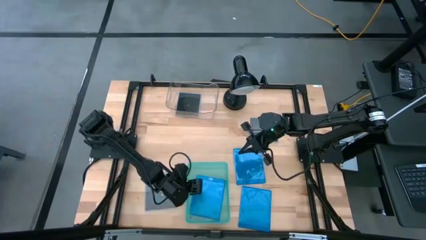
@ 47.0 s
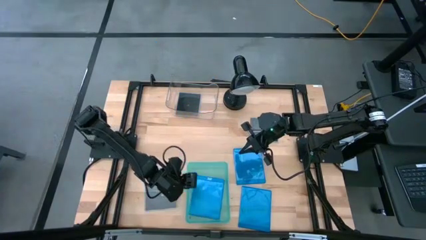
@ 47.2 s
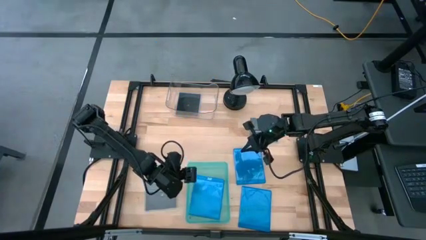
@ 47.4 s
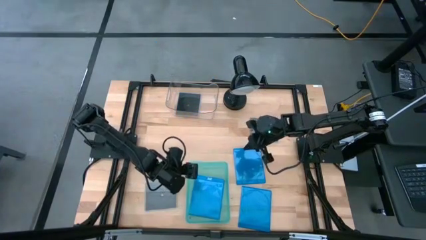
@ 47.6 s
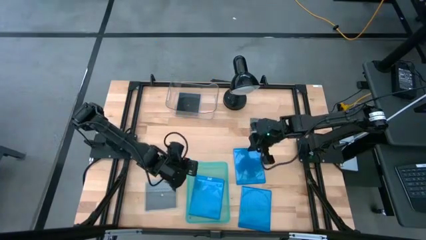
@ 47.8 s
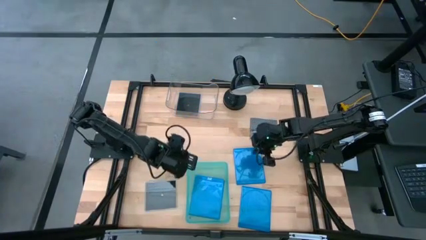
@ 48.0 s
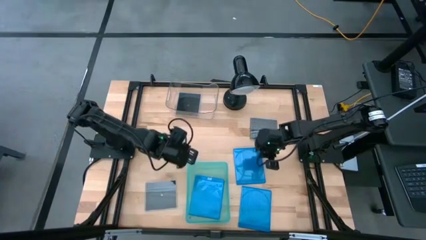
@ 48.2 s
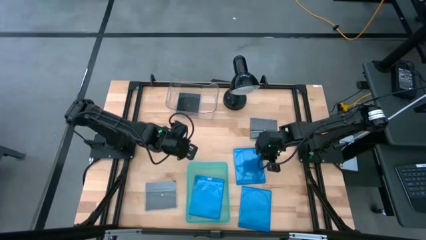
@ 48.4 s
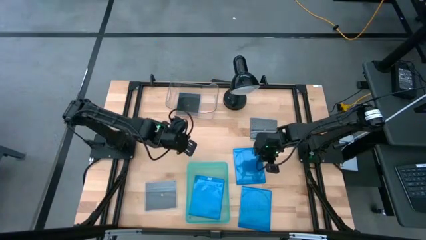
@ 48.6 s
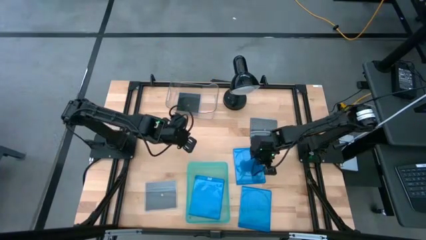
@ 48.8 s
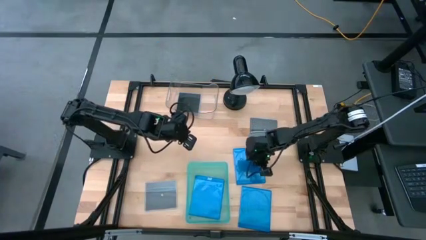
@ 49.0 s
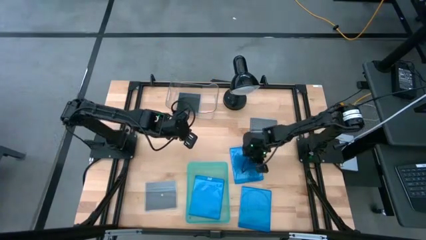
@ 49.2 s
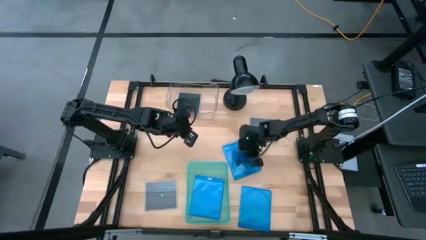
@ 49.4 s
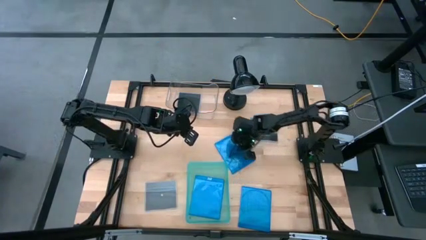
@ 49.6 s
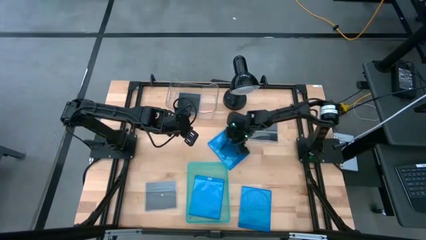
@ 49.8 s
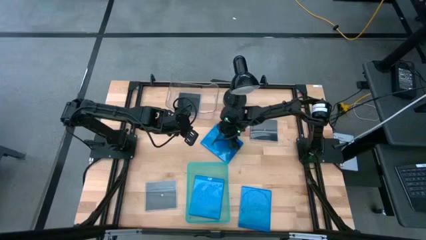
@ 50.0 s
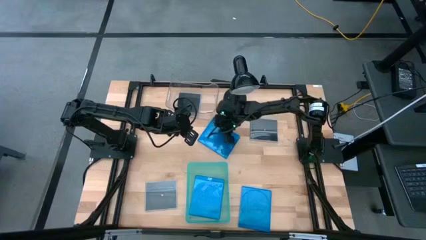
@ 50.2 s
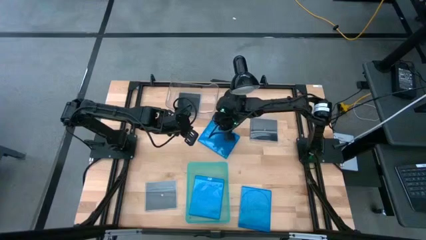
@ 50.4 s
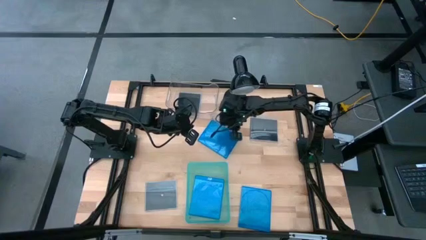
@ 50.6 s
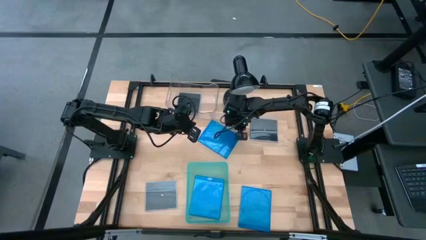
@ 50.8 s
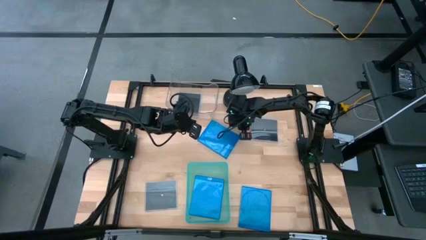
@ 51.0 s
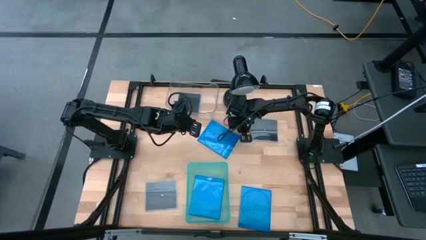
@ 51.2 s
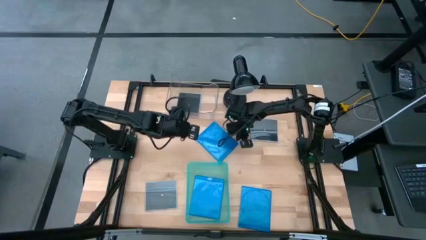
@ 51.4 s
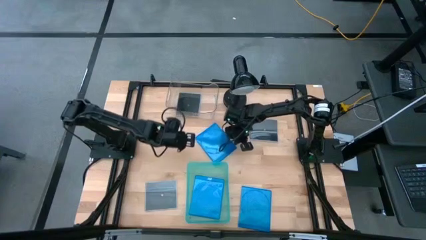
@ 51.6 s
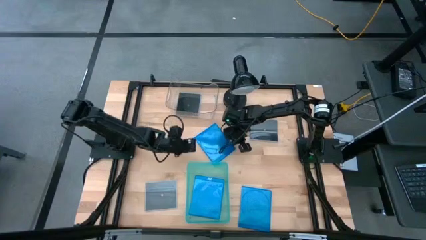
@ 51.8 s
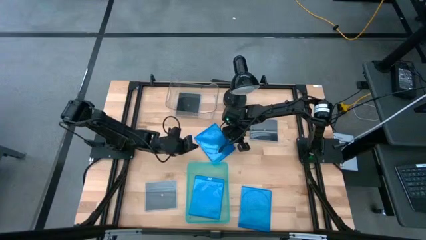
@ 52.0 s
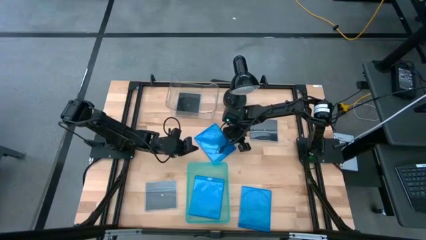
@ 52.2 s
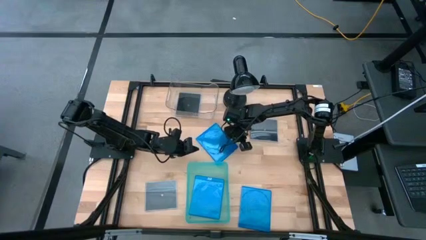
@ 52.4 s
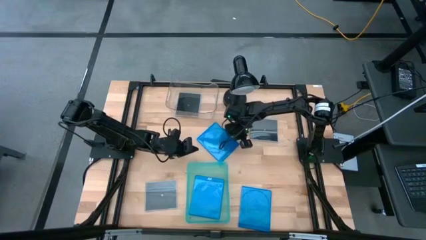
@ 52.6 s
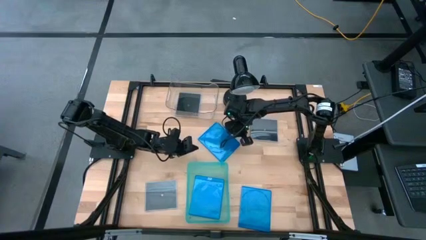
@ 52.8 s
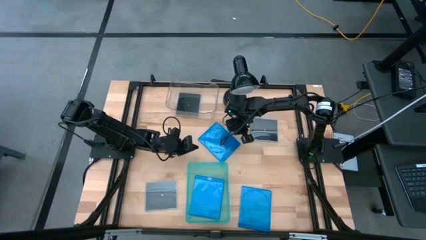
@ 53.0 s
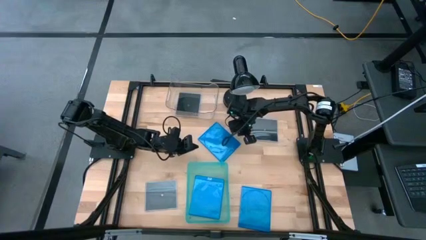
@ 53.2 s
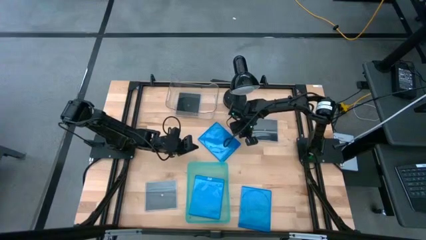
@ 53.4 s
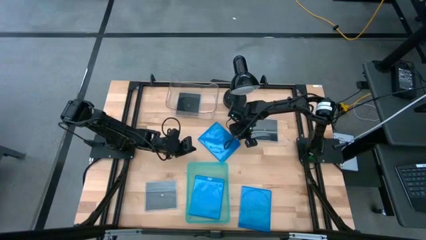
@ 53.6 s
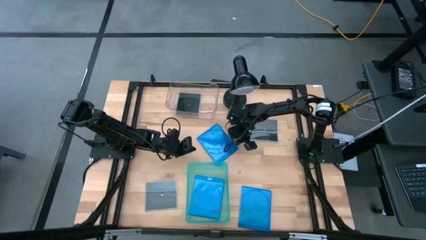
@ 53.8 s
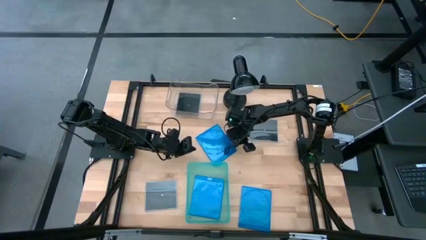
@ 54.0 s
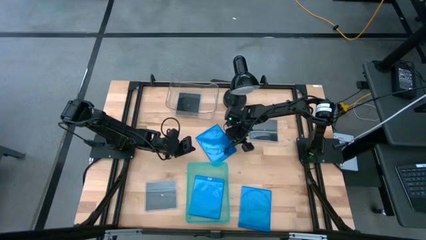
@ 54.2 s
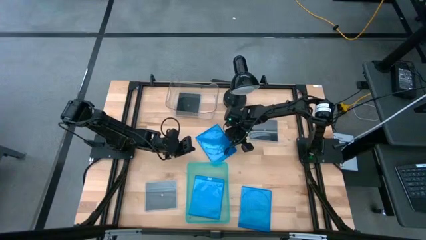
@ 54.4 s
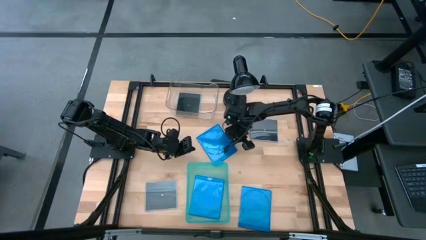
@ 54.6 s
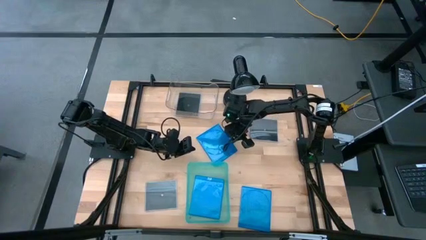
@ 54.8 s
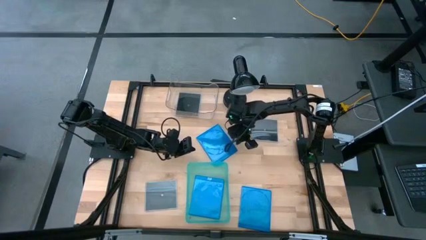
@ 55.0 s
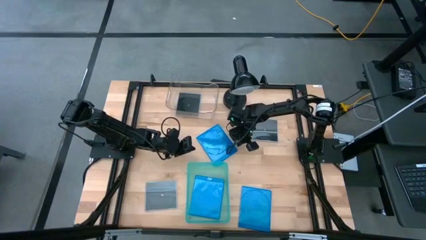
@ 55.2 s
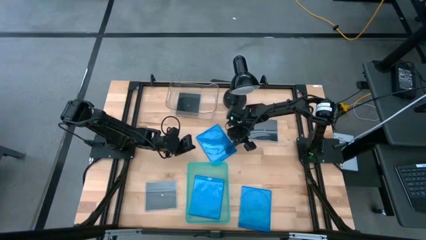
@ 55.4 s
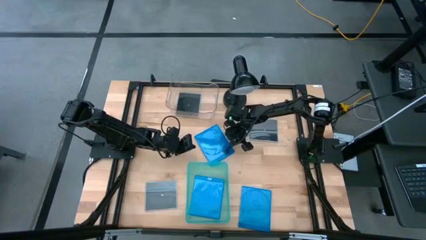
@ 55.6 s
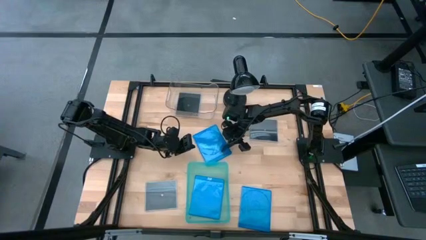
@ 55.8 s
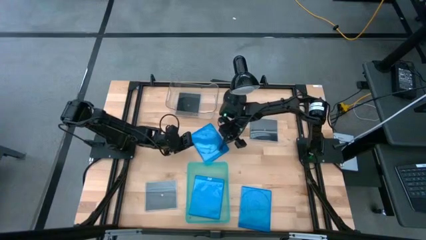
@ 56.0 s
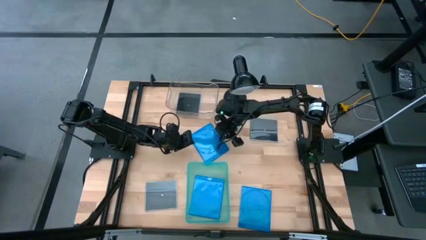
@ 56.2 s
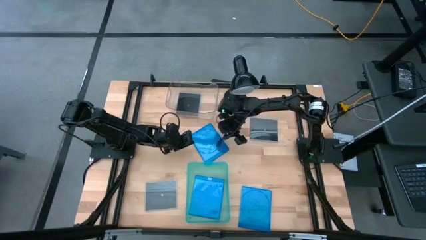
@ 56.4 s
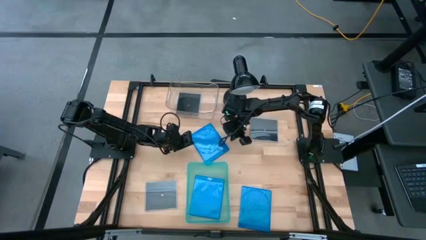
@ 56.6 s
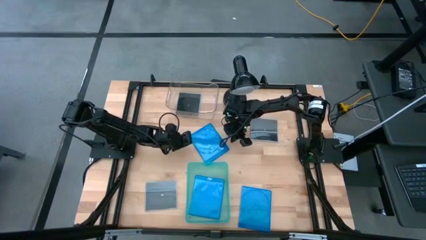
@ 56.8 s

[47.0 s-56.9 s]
Task: Pick & place jewel cases by type
Put the top blue CD case into the green bin

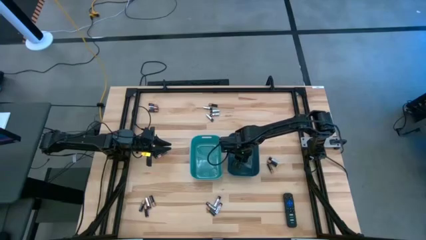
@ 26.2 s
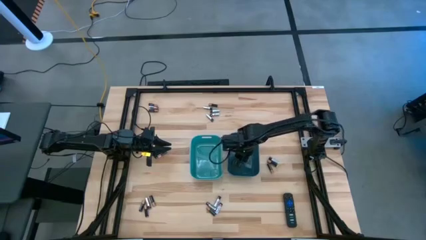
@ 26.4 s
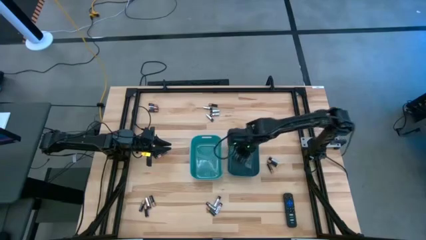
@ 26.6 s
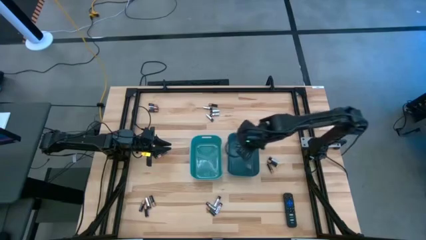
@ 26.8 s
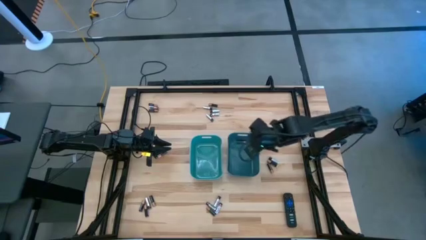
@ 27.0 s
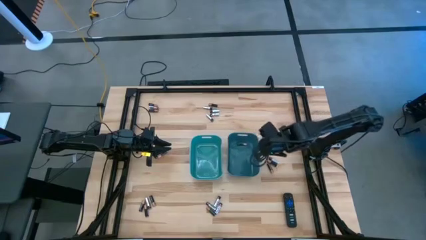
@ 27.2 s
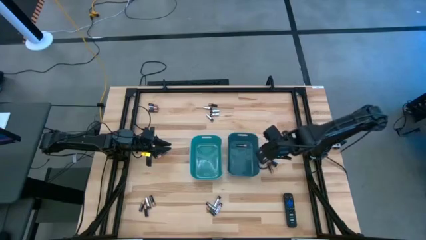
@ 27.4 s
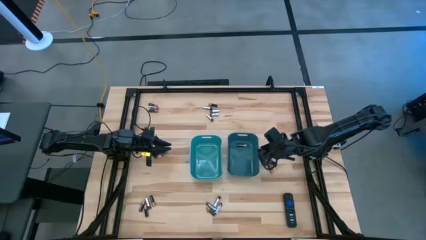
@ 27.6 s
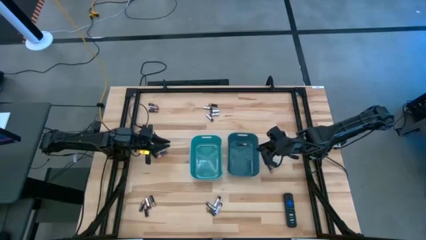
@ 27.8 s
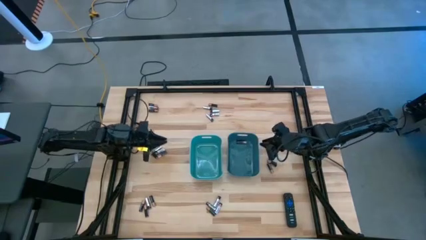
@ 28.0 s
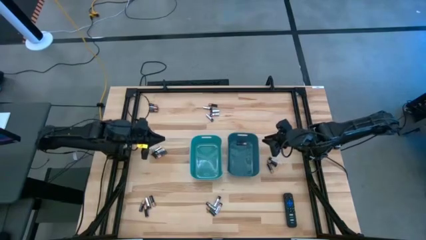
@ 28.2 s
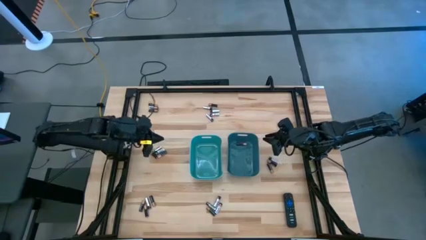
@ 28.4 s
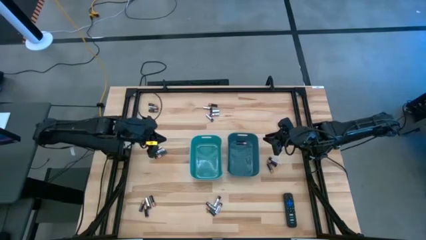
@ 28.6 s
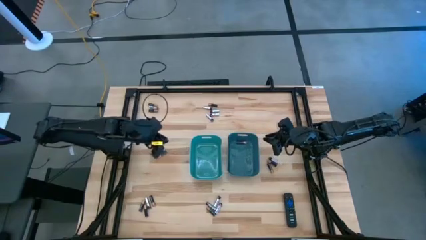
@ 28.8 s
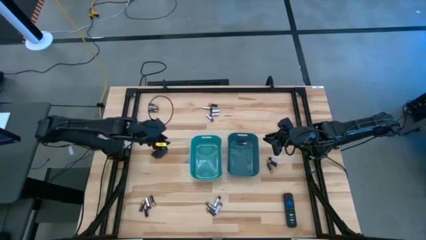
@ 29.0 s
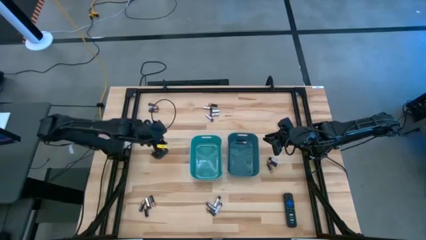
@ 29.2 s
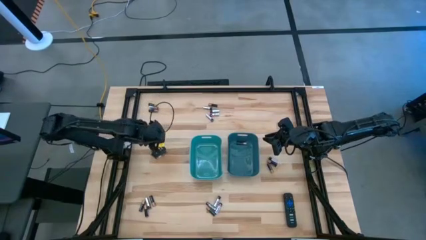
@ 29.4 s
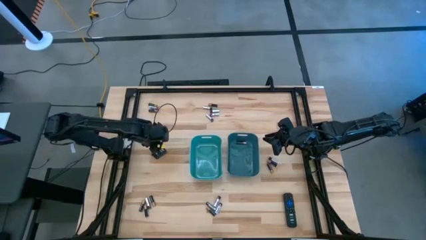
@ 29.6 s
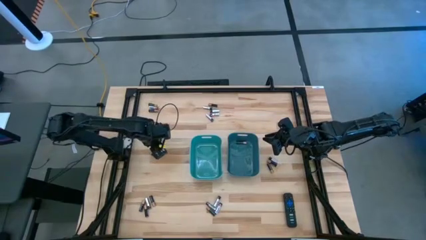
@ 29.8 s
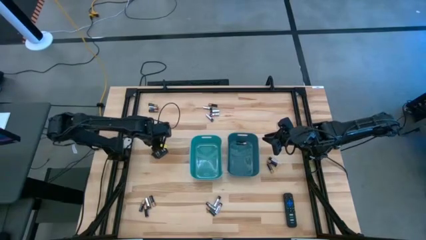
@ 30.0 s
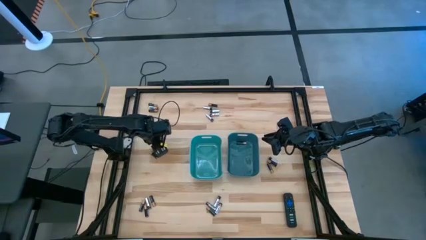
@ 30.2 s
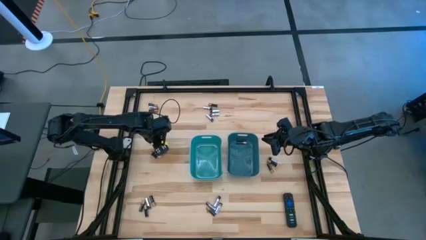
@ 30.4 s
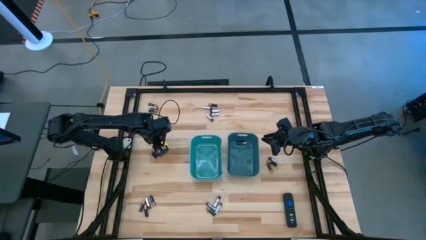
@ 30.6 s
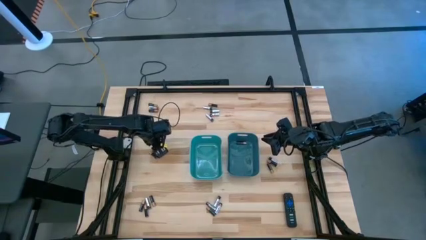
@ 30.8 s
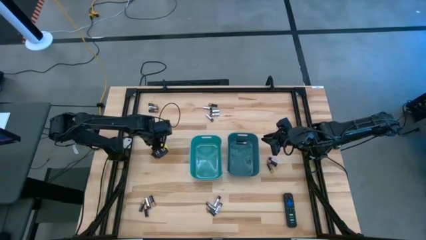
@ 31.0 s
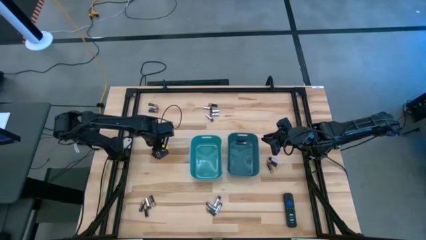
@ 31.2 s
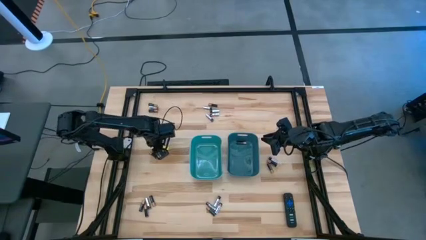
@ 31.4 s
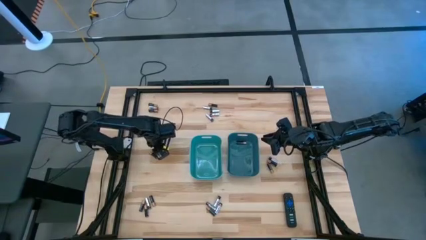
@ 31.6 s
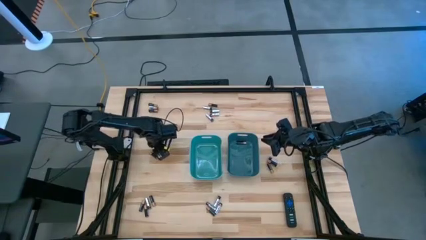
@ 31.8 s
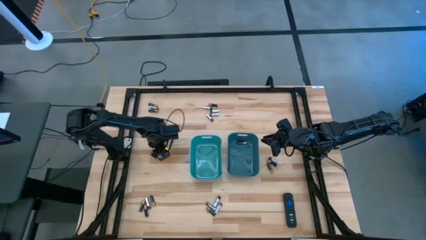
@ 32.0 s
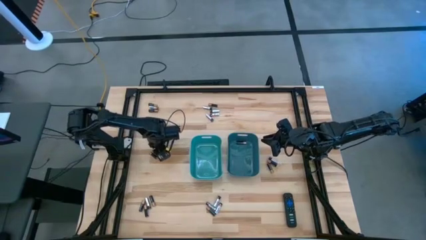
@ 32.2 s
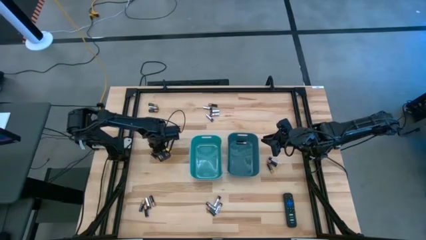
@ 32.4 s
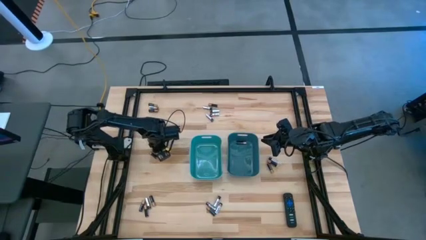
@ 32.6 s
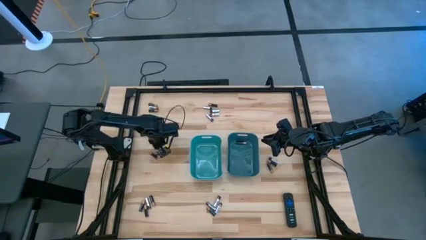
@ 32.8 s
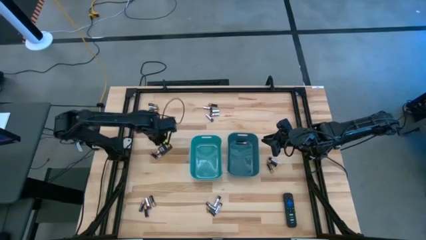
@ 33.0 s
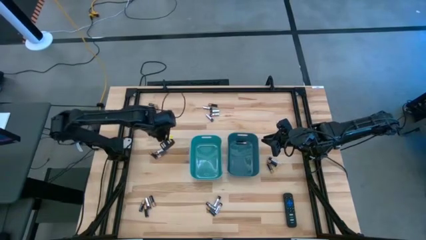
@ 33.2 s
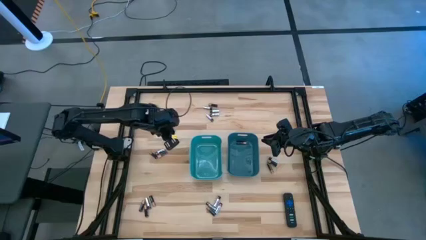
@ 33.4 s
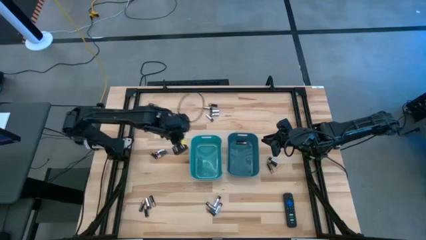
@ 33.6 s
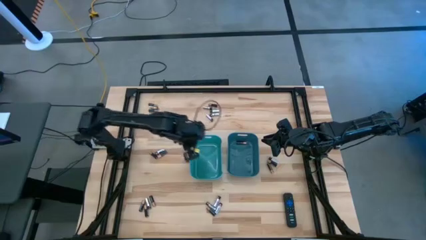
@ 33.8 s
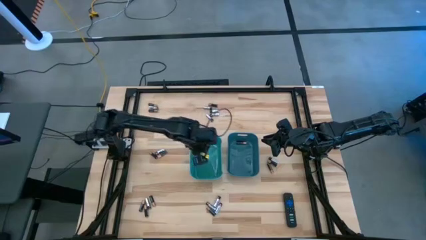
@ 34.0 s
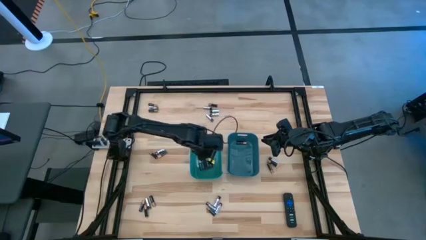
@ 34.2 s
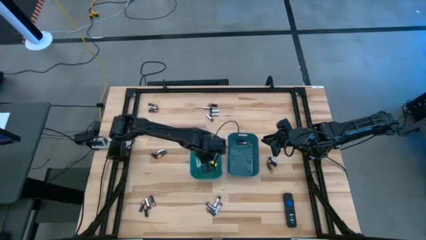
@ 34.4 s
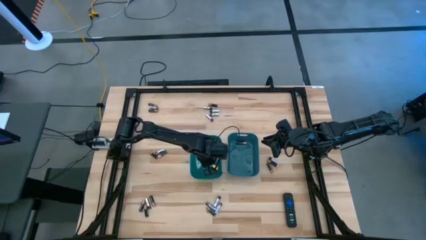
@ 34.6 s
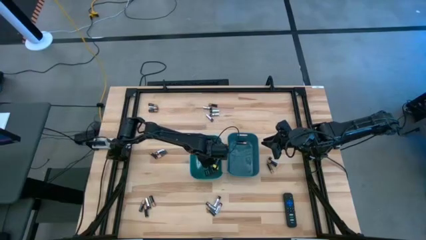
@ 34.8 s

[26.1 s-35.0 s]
Task: Sort batteries
Put the silver battery into the green bin
